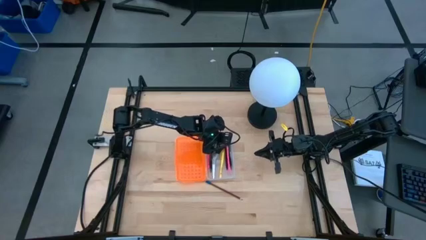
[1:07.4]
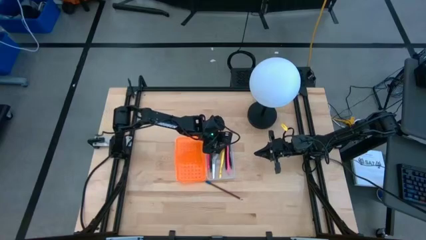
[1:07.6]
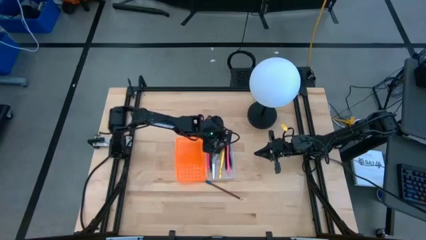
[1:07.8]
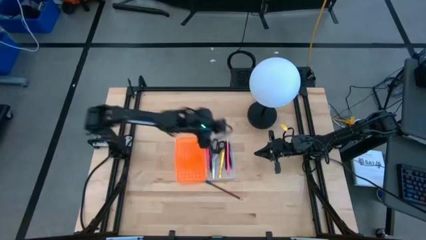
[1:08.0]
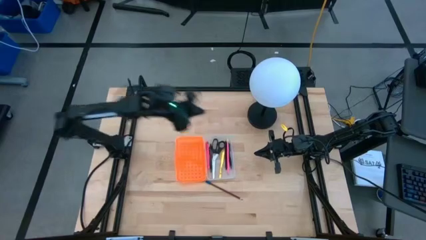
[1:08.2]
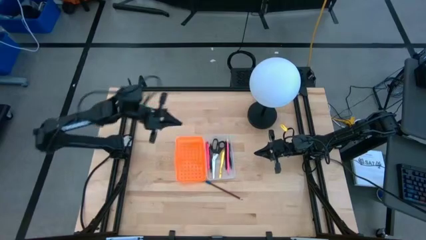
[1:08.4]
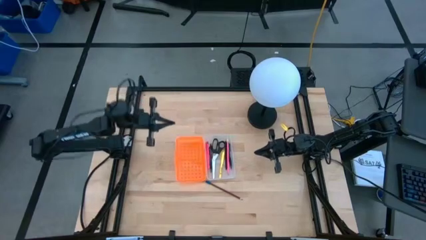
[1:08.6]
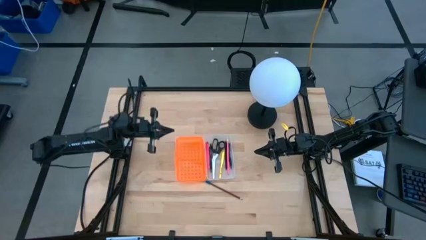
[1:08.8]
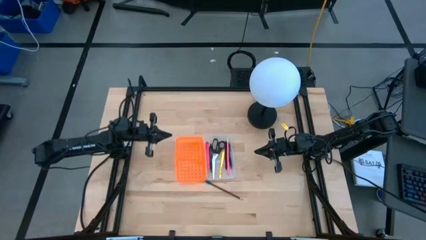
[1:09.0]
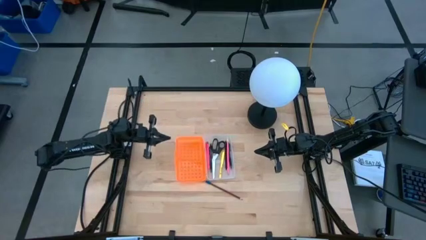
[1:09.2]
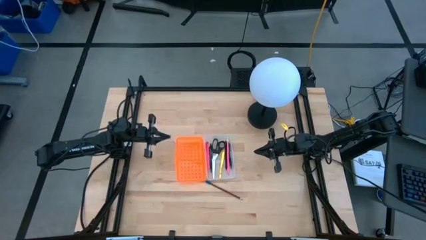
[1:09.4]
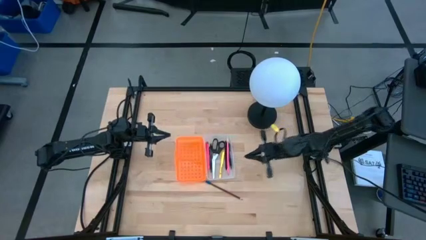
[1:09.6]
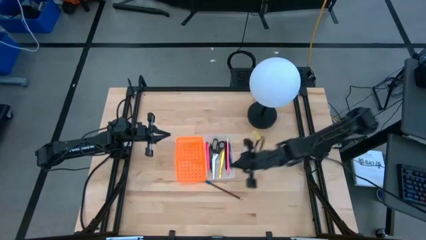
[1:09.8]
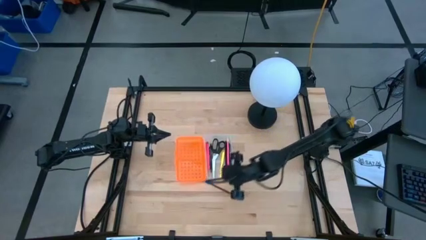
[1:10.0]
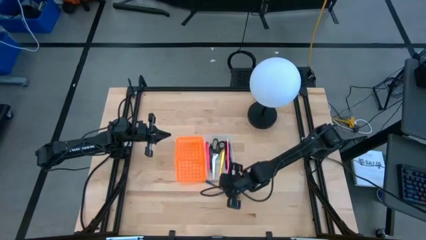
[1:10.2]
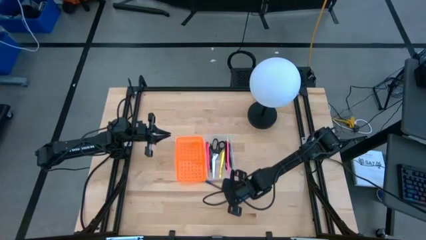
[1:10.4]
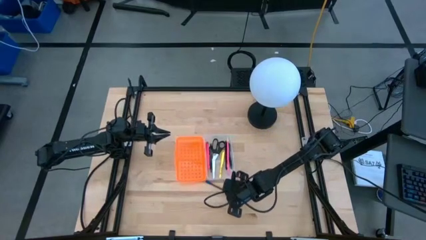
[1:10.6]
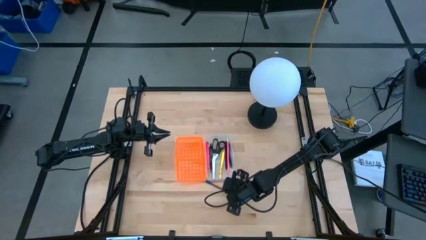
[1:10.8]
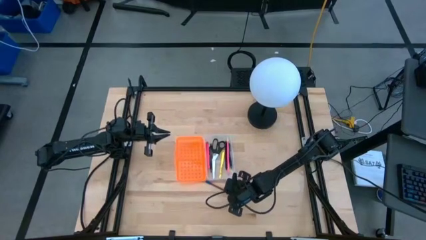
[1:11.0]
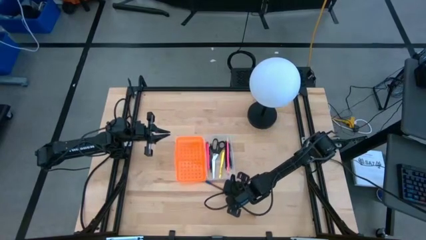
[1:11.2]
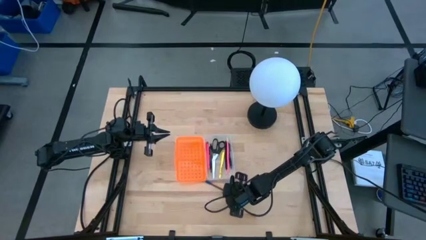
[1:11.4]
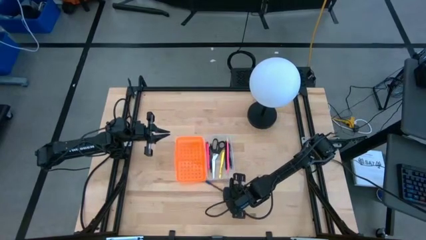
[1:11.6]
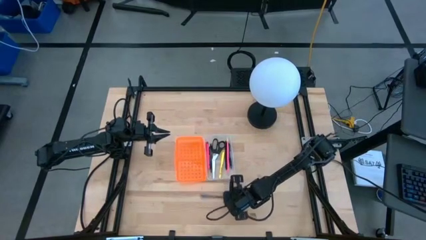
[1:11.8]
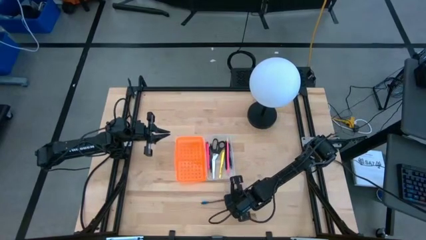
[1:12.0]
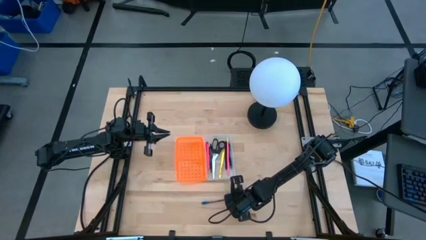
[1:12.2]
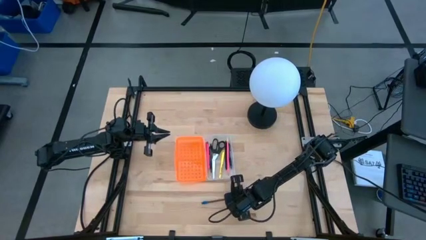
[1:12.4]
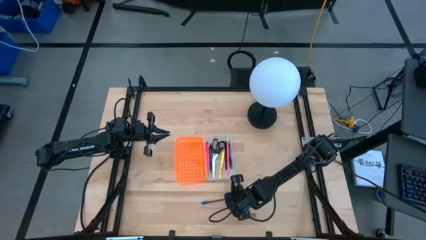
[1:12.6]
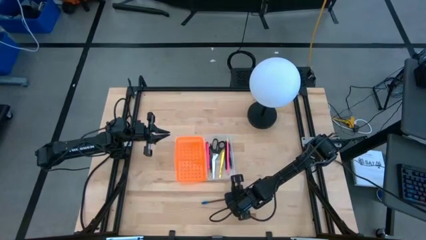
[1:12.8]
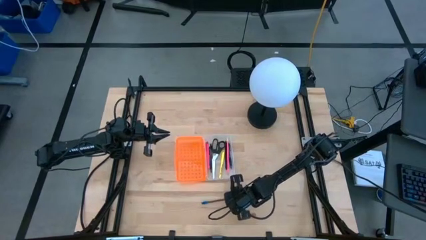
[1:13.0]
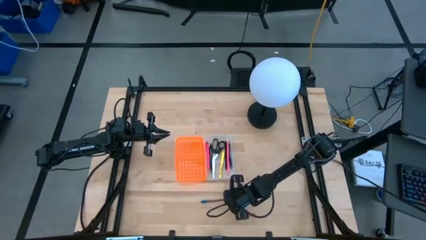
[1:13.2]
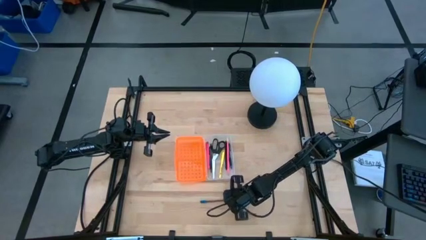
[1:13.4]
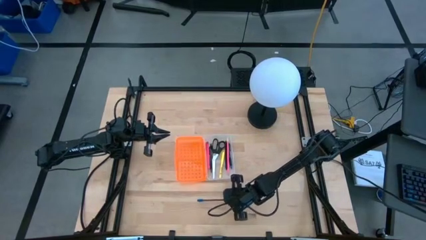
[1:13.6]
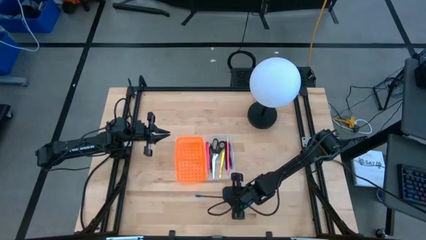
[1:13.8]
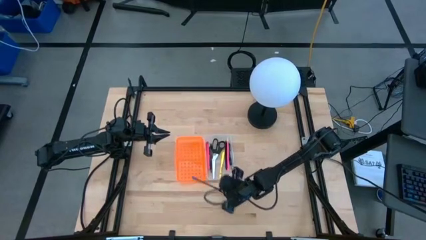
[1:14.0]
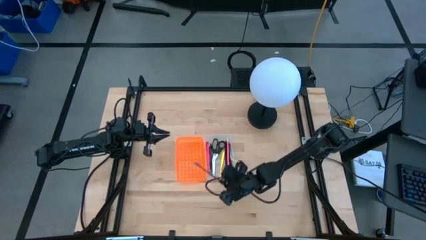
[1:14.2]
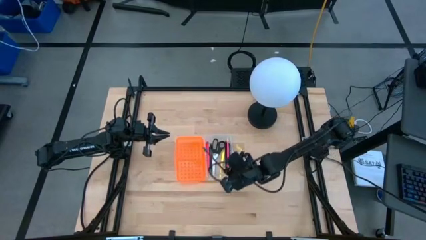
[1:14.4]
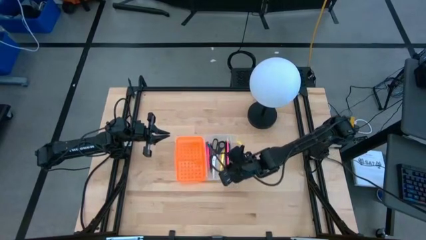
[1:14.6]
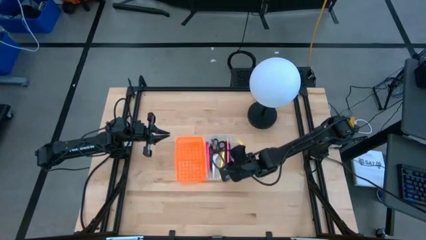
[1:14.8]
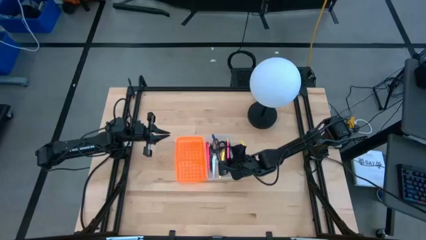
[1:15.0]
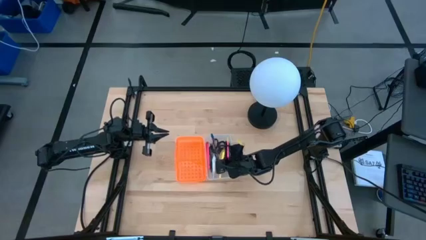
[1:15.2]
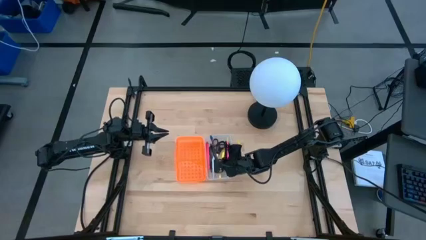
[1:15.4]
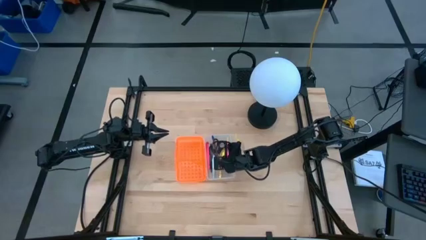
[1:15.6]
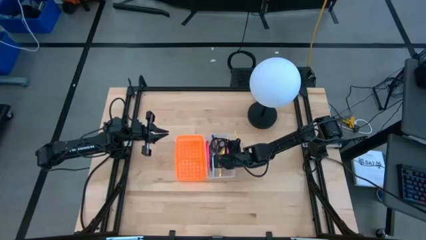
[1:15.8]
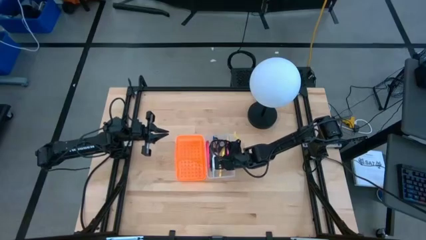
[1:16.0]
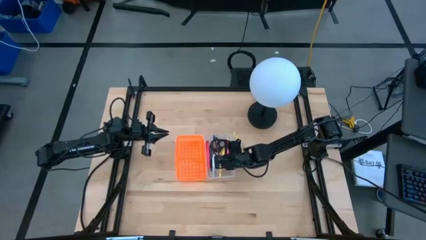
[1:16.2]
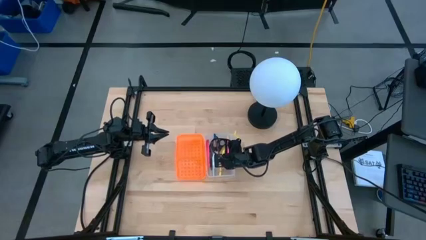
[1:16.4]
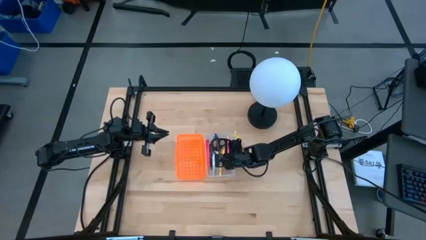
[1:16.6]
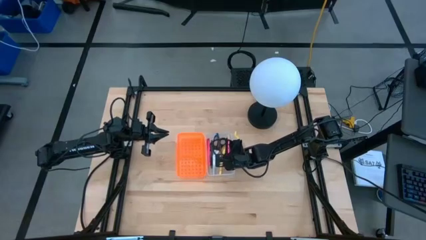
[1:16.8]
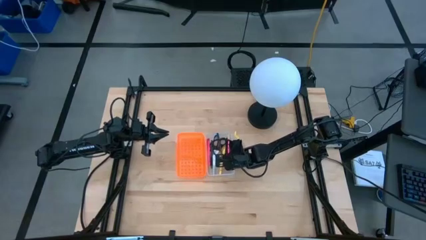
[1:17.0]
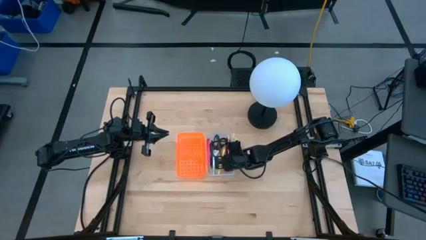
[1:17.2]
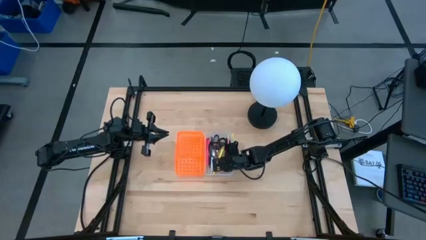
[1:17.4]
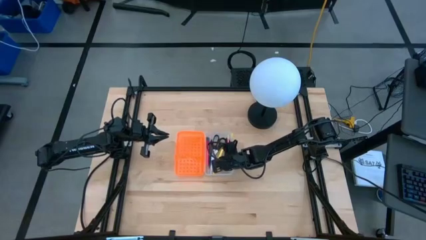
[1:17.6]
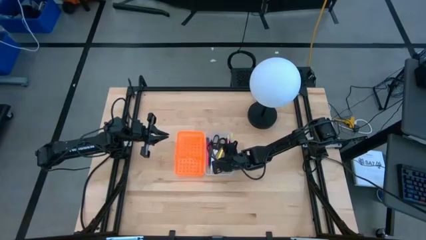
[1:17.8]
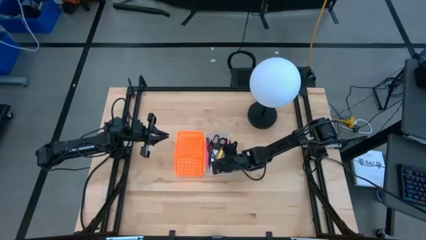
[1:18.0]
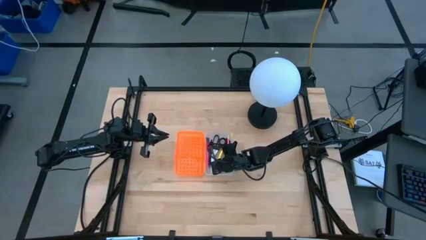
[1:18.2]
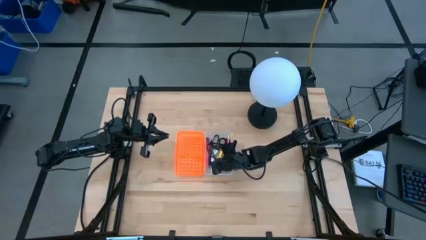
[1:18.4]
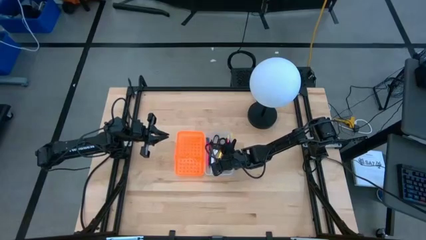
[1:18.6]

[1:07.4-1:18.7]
Task: Pick & place school supplies into a supply box
Put the brown pencil into the supply box
